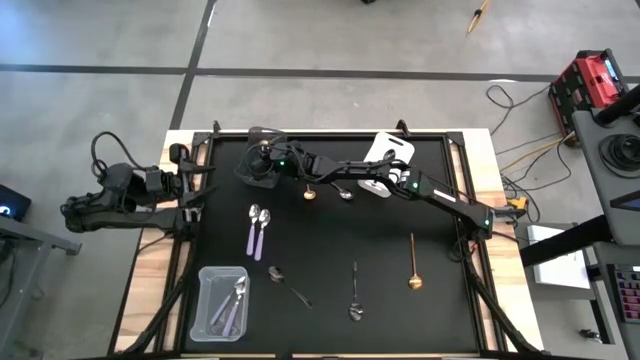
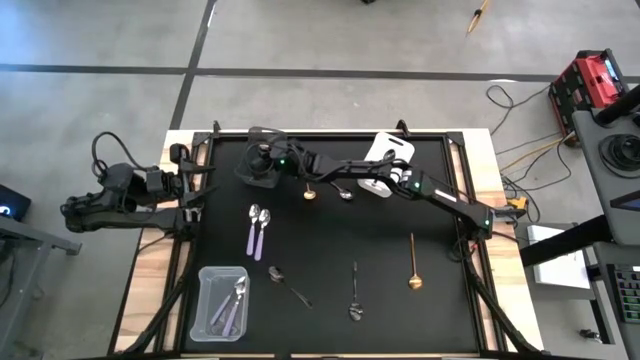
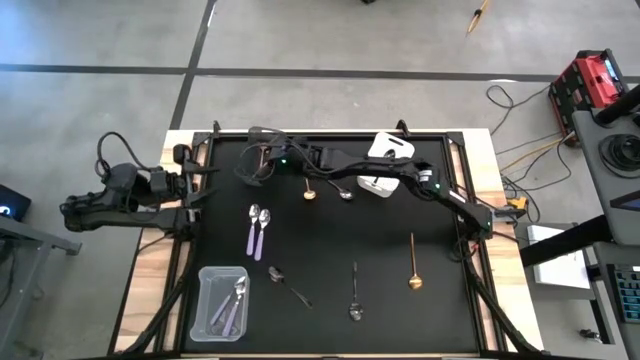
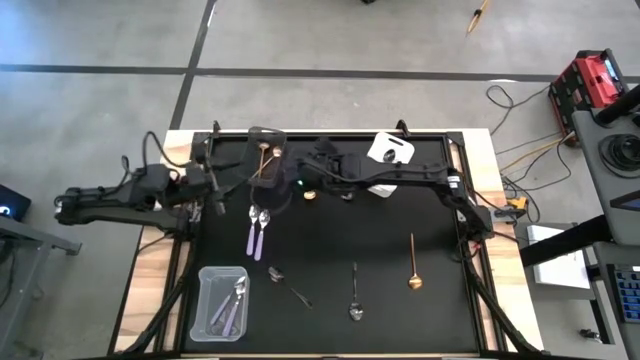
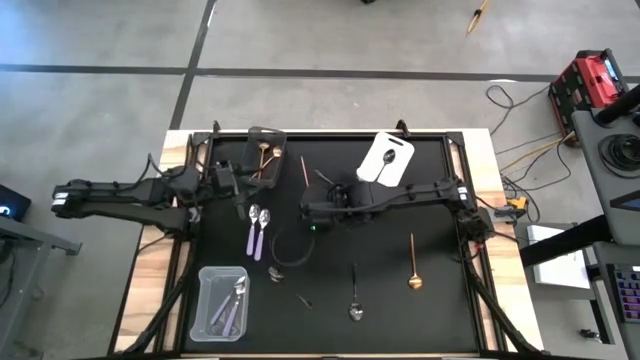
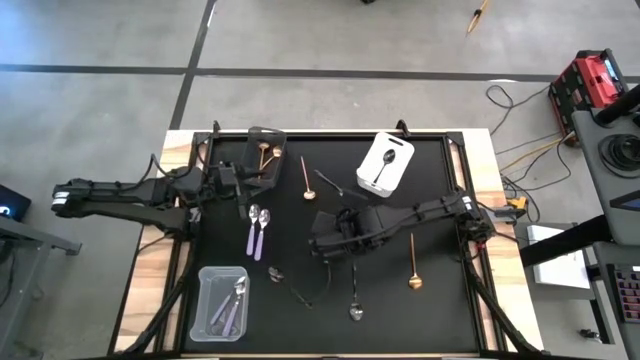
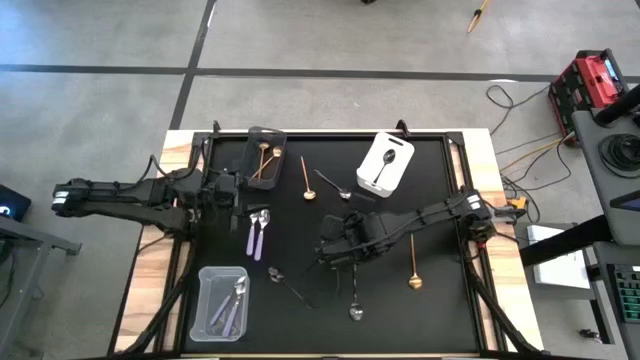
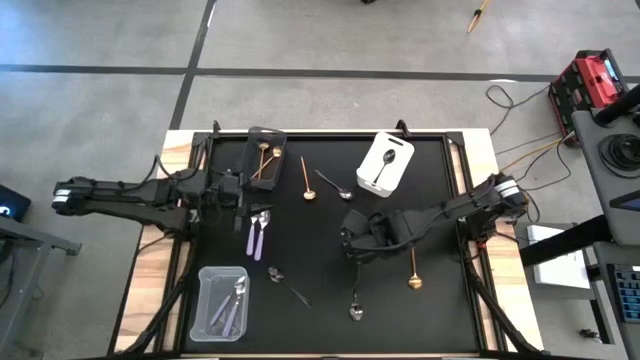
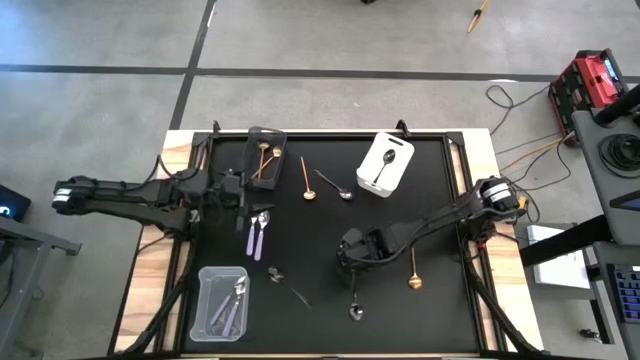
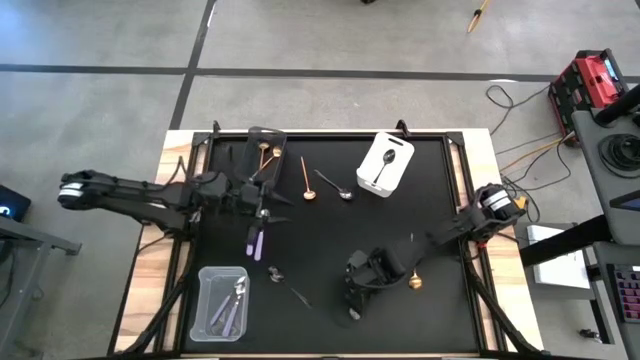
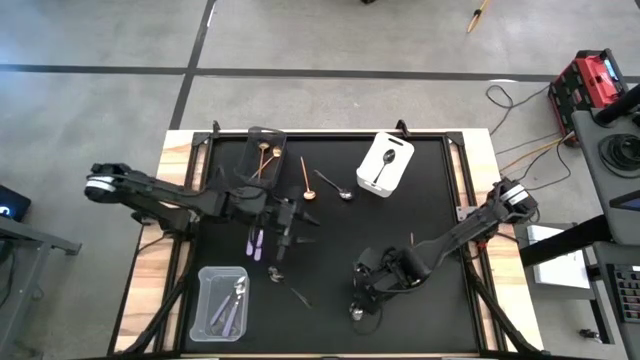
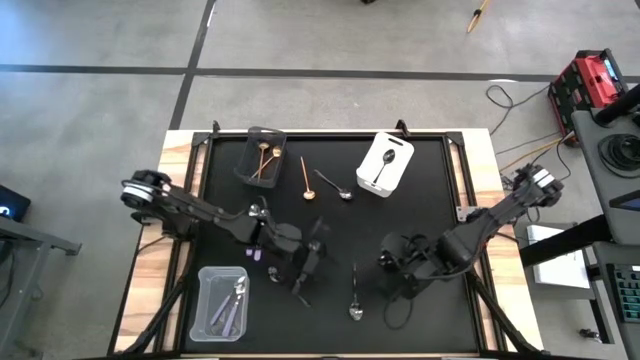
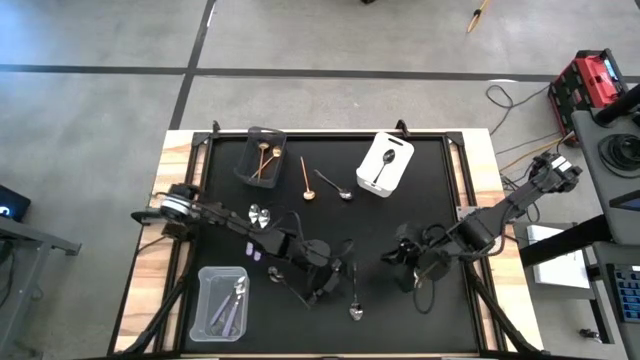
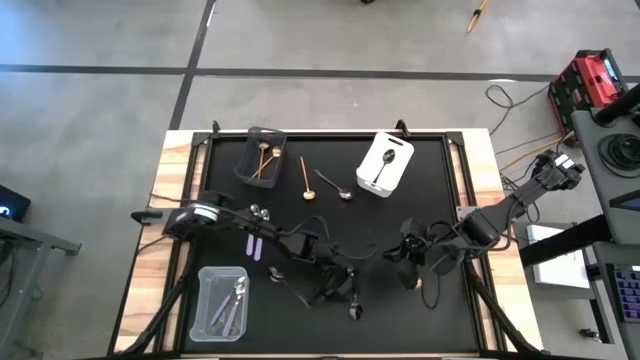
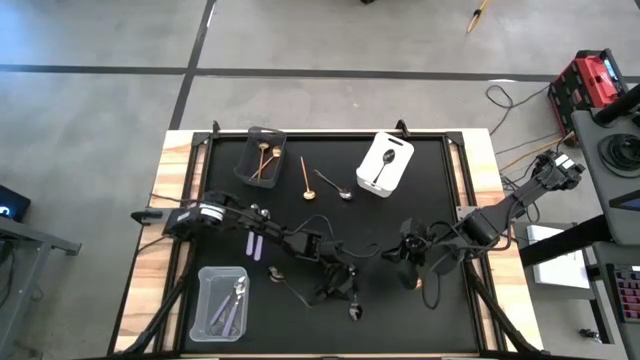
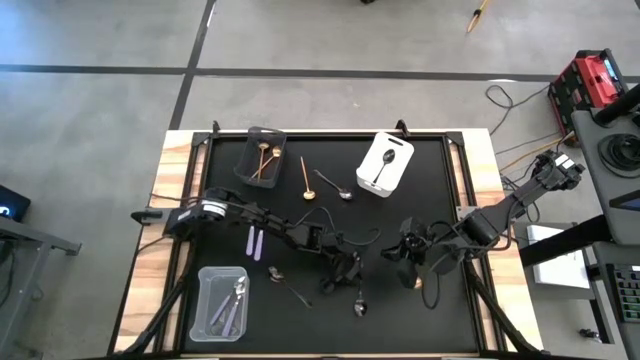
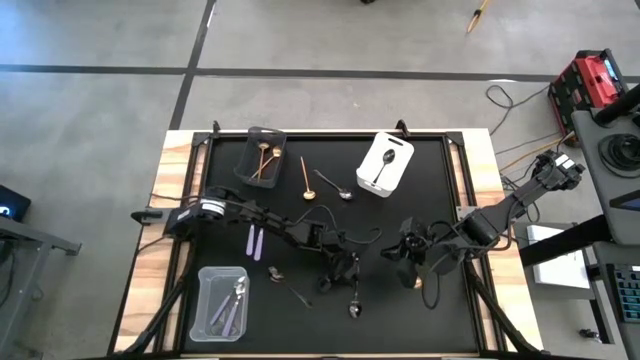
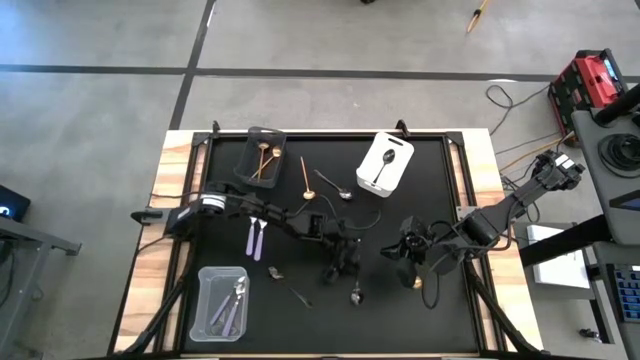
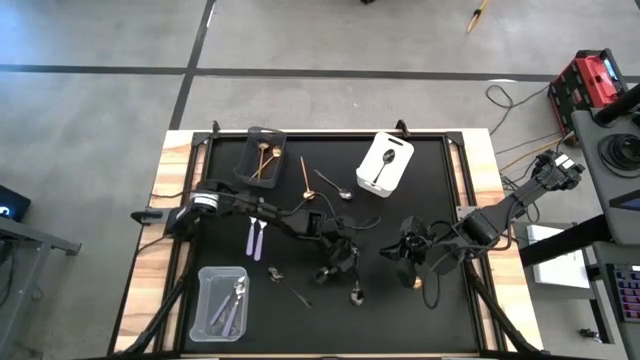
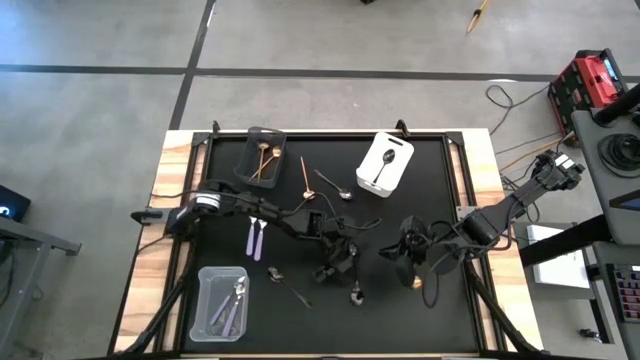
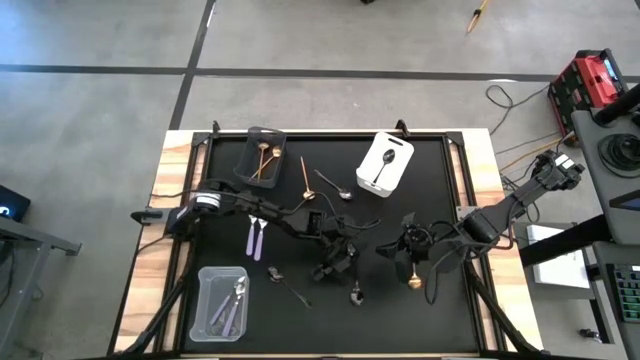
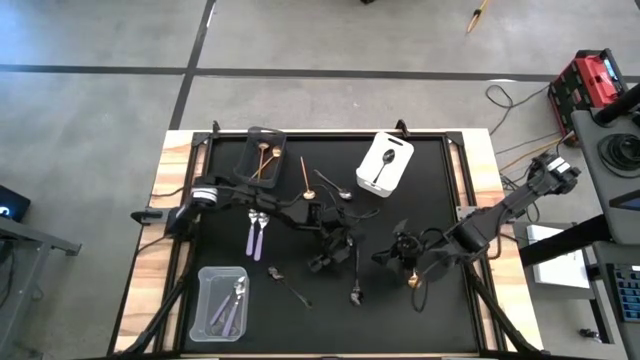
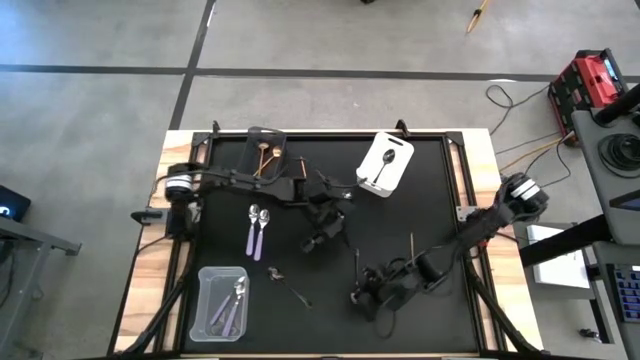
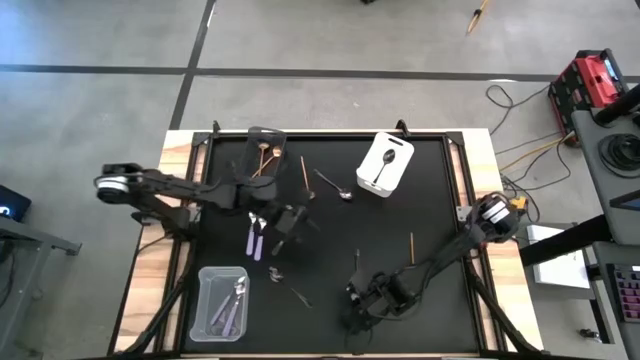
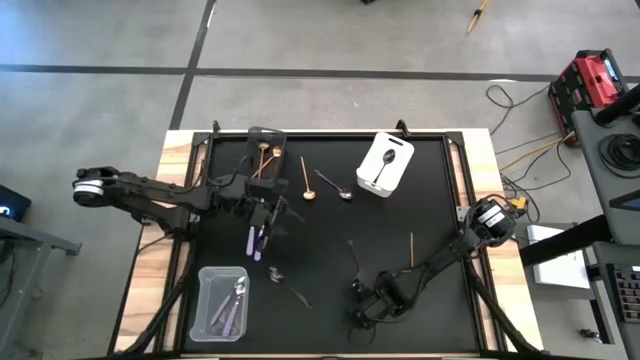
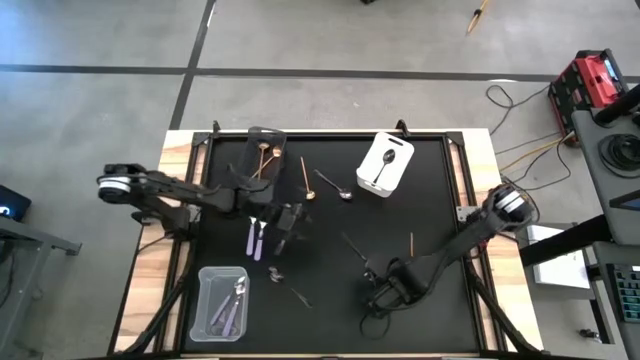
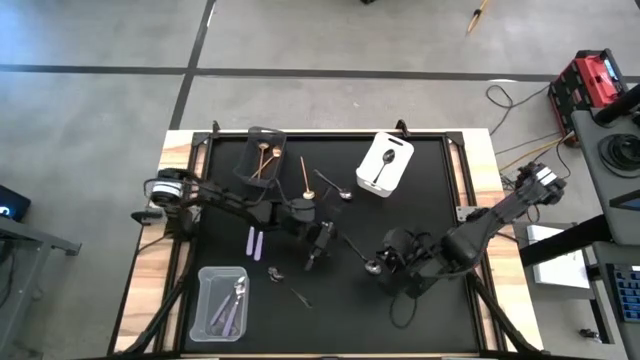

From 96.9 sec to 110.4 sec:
Task: Sort silverware by color (type)
Put the black spoon into the white bin

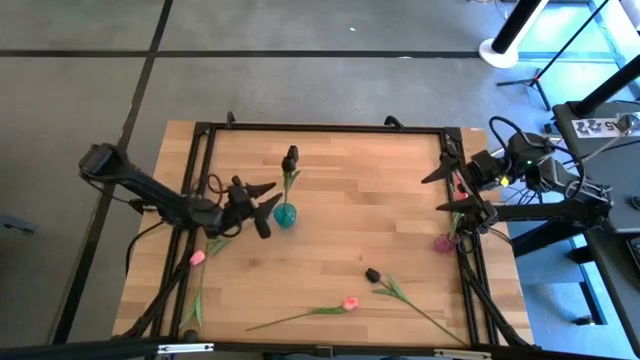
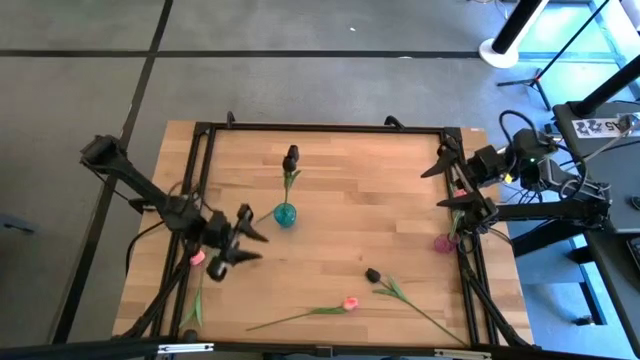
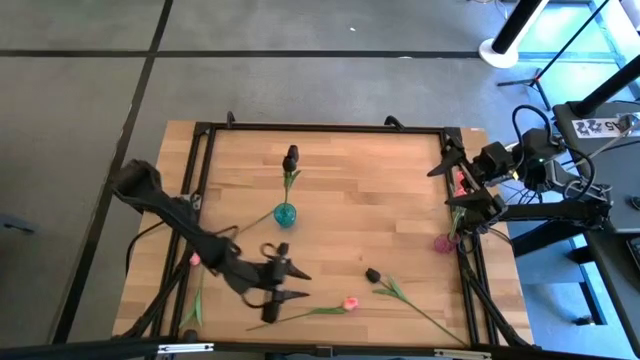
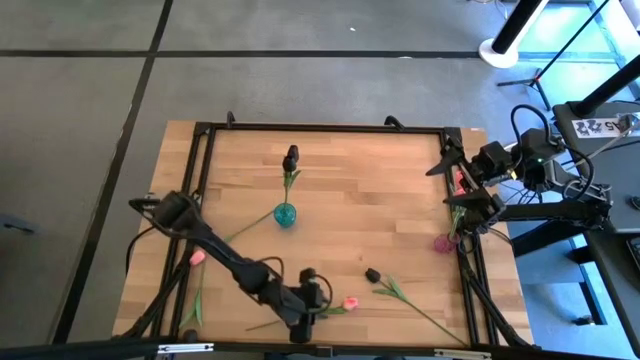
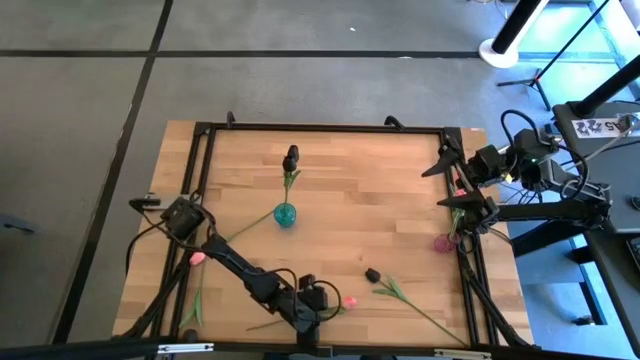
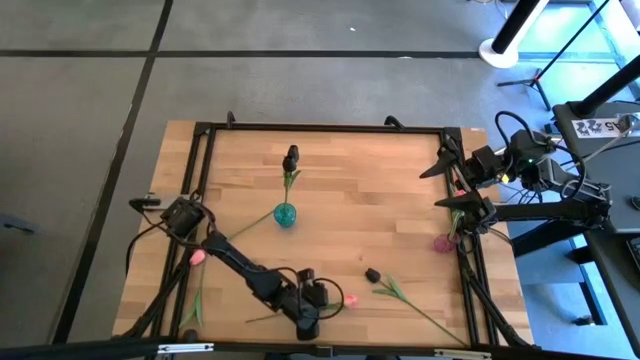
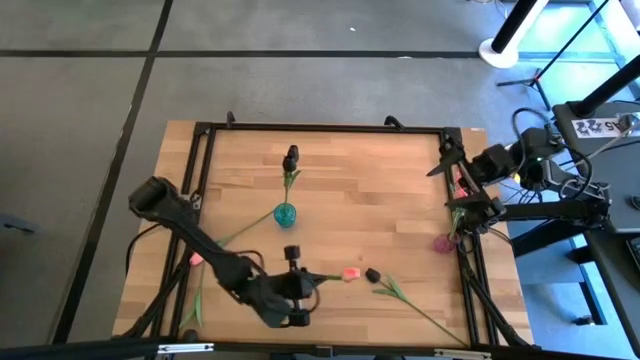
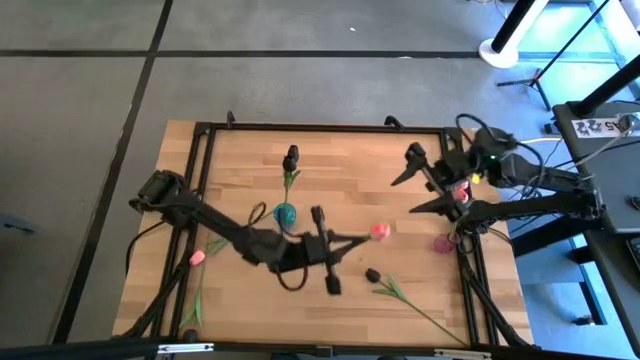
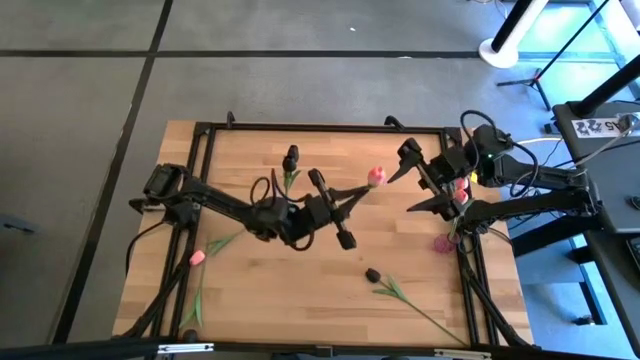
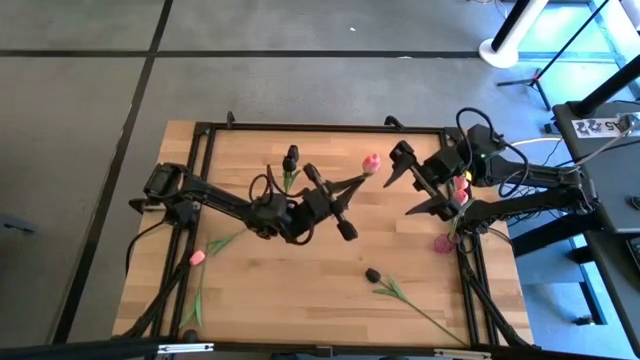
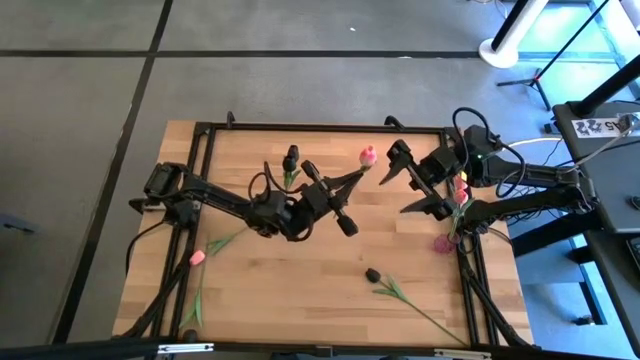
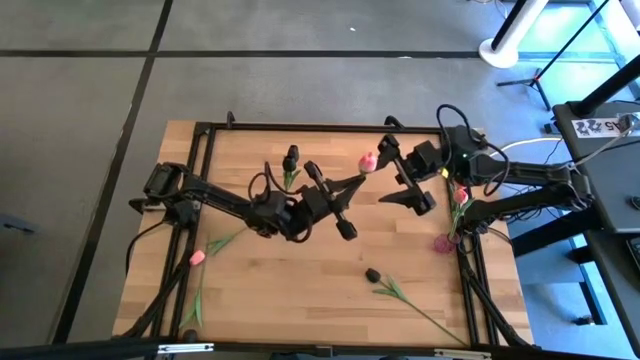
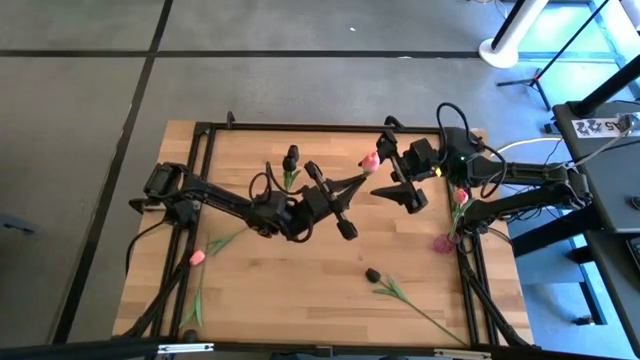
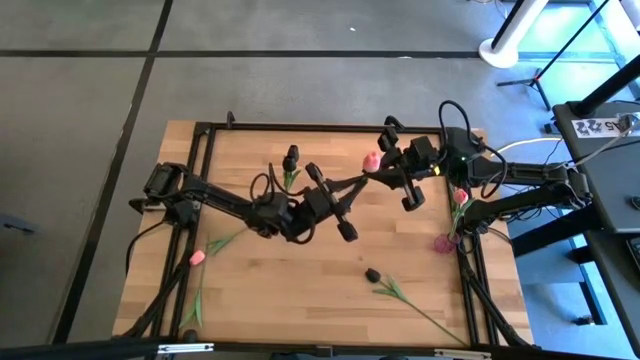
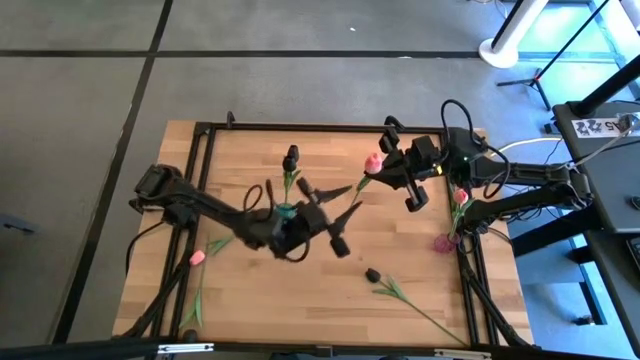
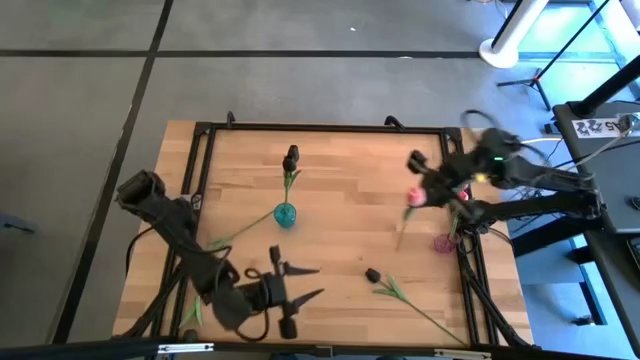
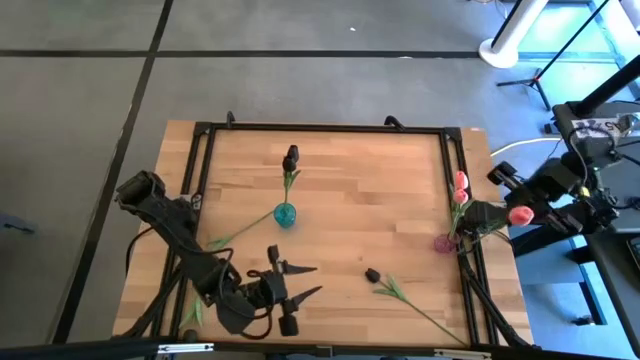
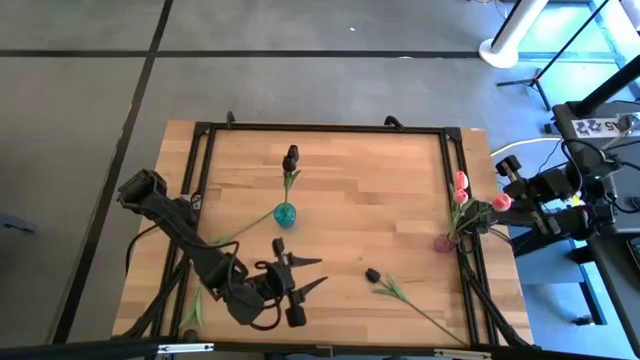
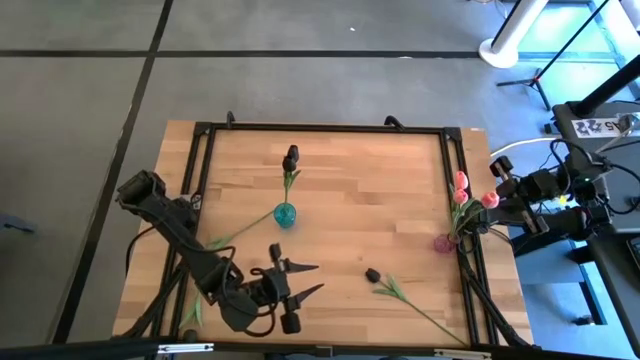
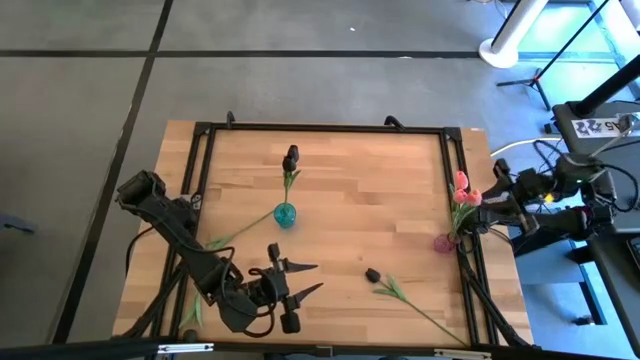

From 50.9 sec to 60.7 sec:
Task: Sort flowers into vase by color
Put the pink tulip into the purple vase
